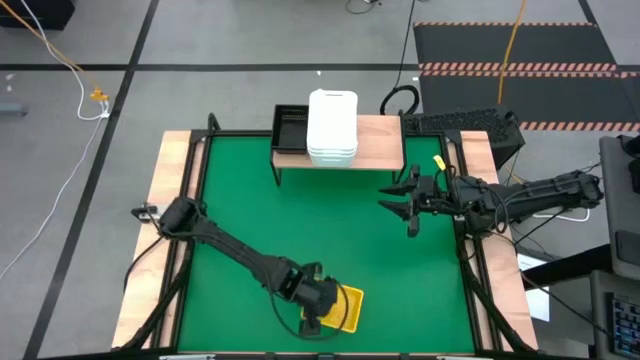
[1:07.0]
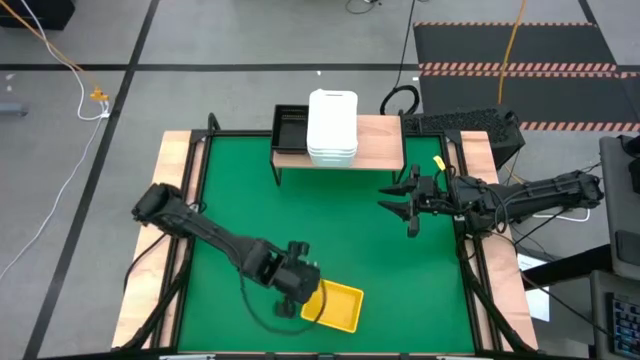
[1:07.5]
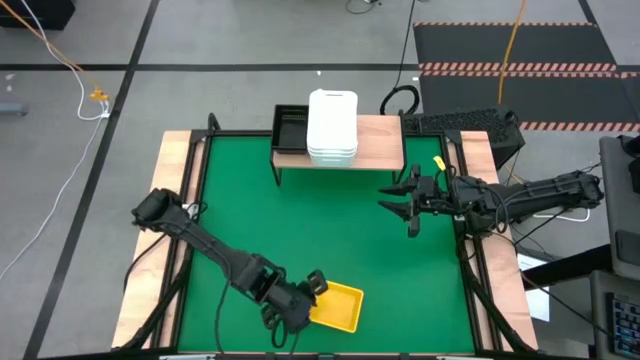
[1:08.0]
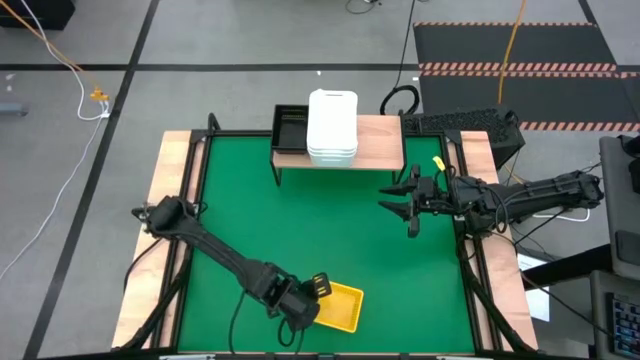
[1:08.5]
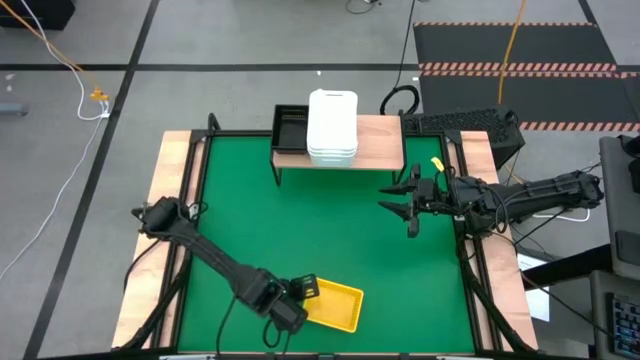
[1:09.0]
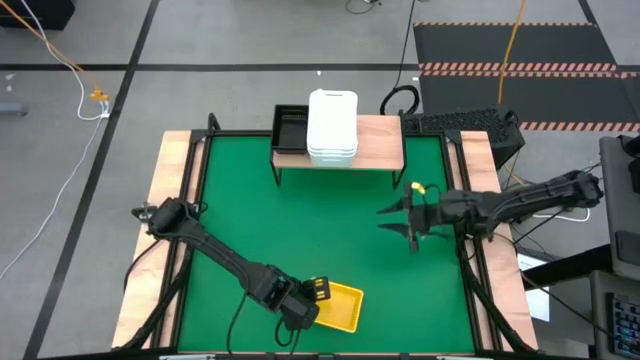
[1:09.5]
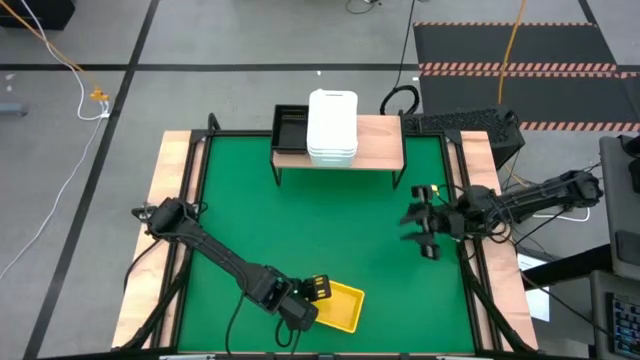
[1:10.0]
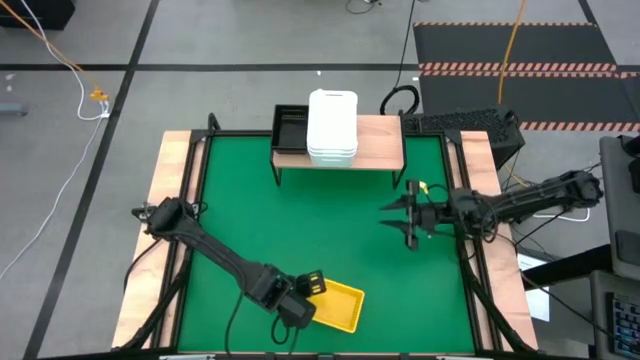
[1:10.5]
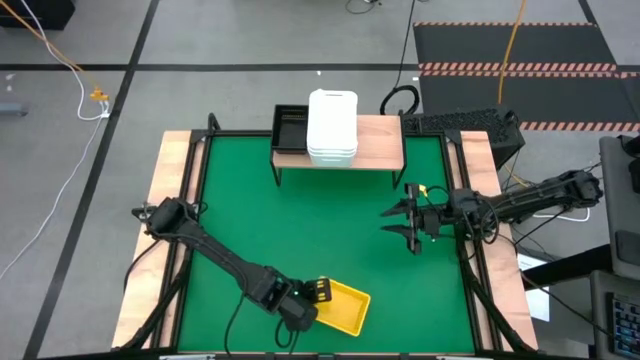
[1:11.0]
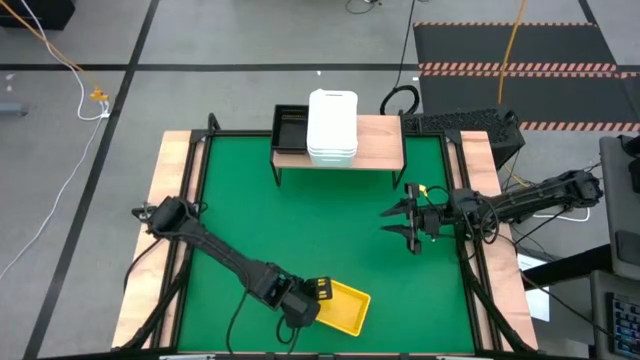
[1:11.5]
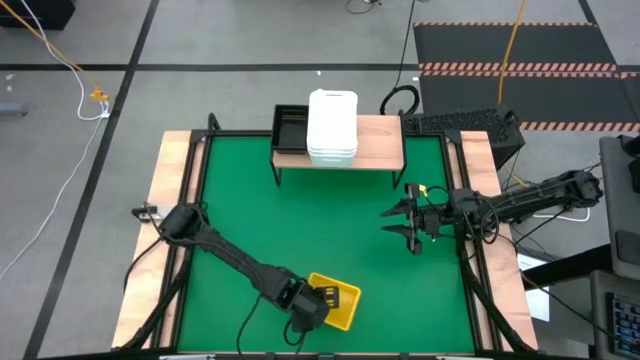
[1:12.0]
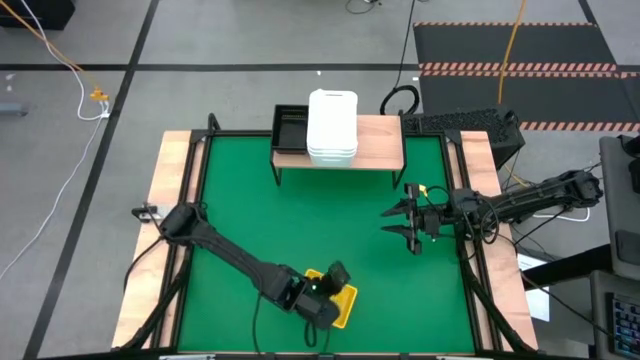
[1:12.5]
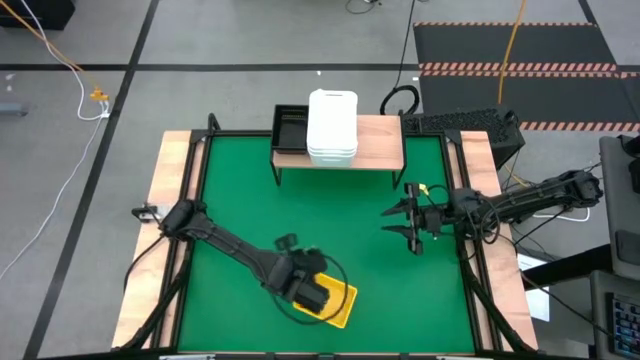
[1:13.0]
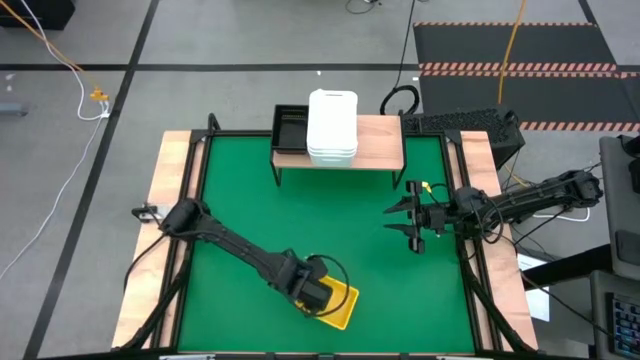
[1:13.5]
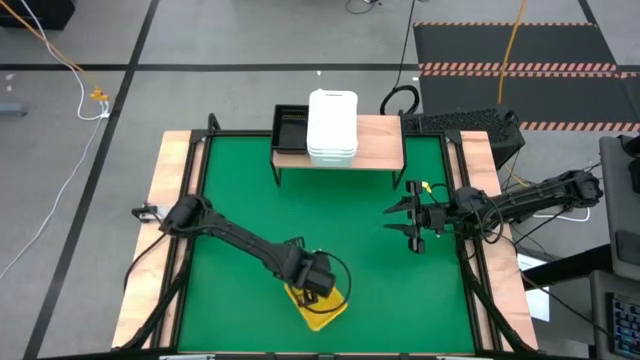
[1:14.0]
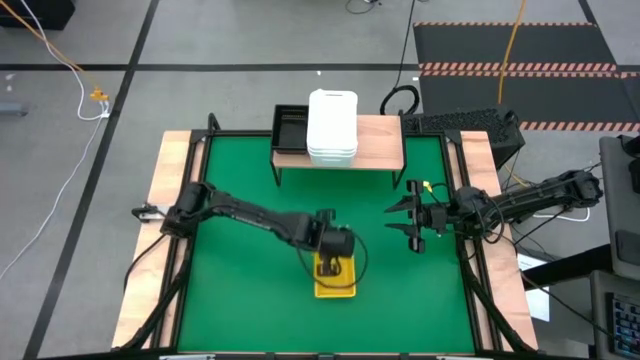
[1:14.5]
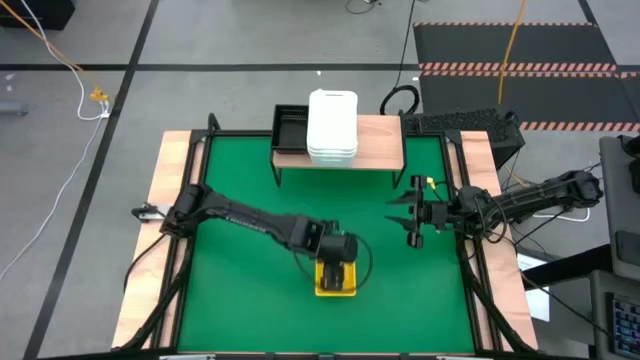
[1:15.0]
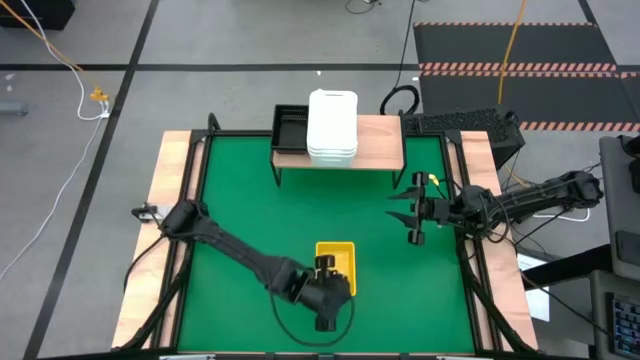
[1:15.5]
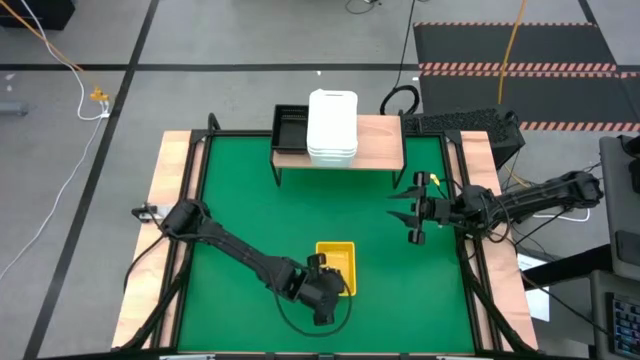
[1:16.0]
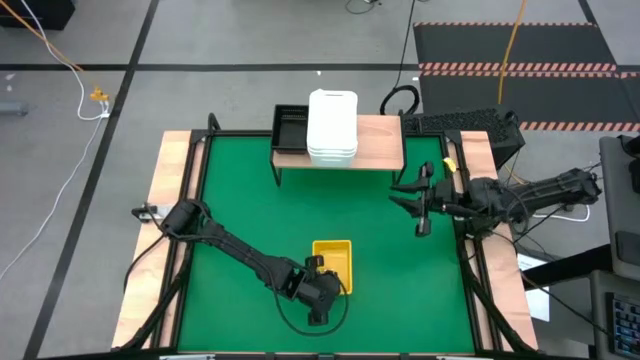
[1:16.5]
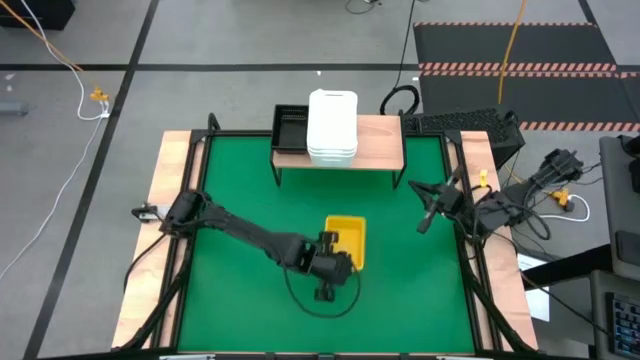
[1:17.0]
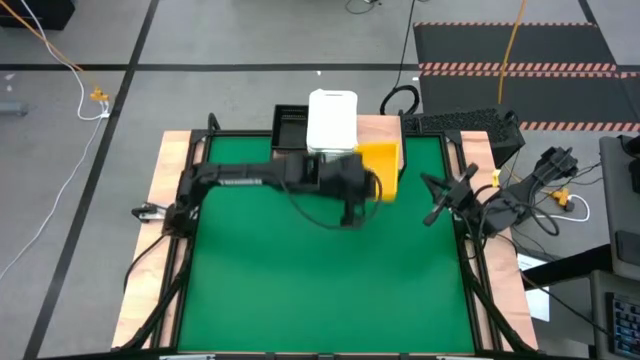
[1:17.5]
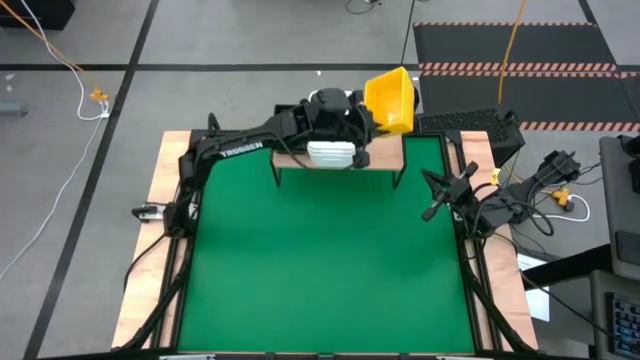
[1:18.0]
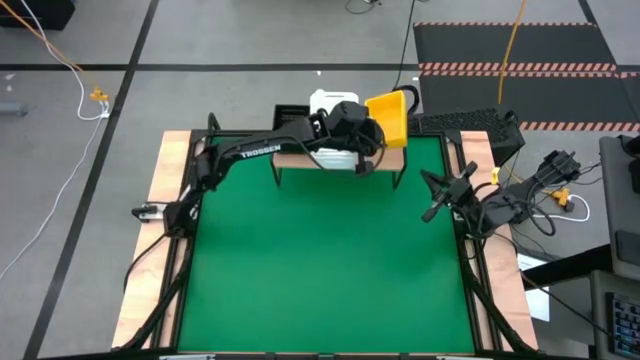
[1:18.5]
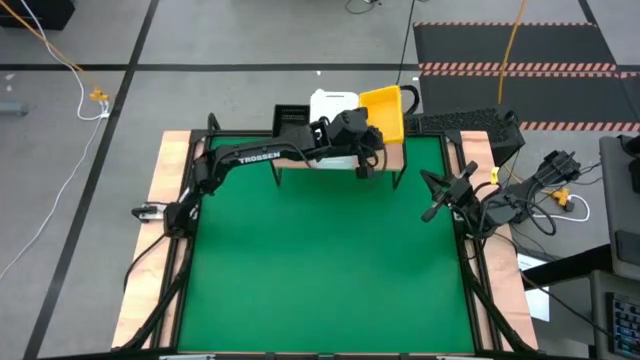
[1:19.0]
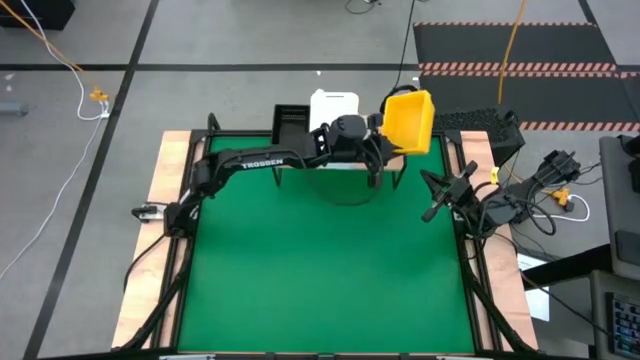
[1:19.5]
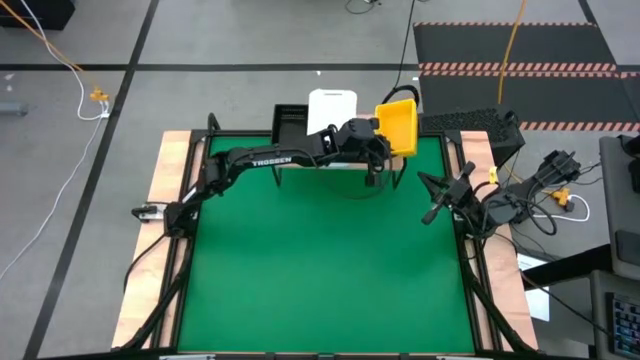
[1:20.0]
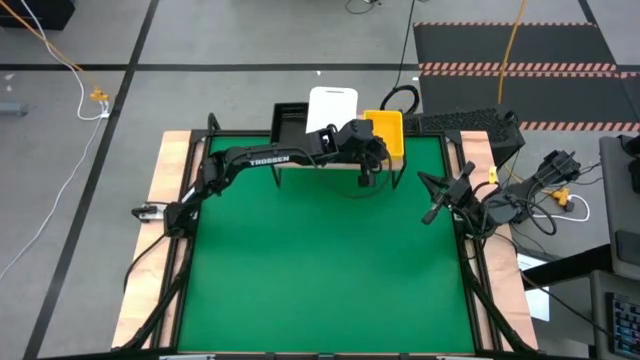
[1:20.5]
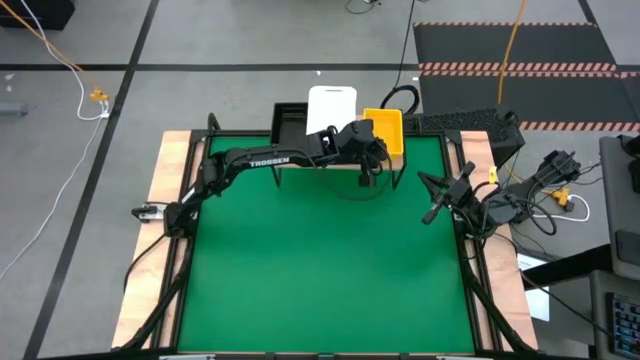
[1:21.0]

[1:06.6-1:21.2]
Task: Stack baskets on shelf by color
Put the stacked yellow bins on the shelf

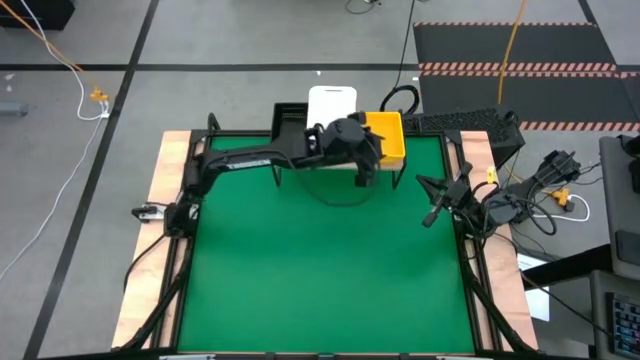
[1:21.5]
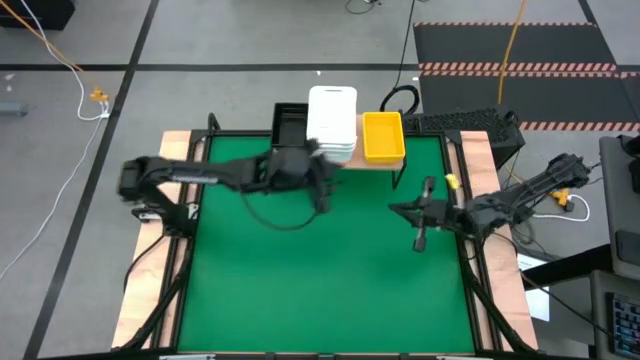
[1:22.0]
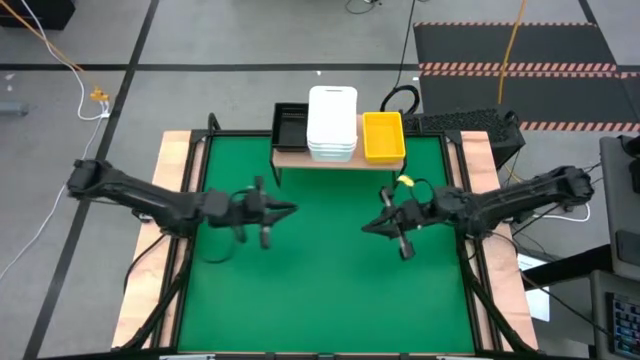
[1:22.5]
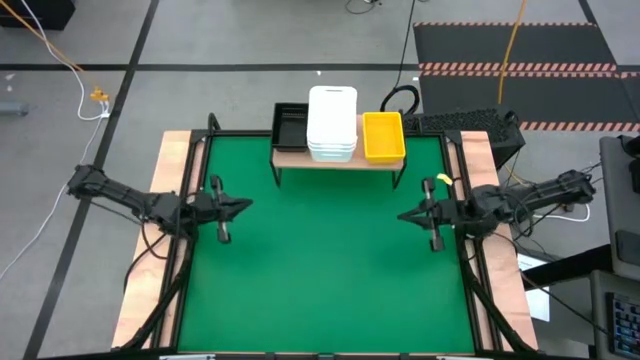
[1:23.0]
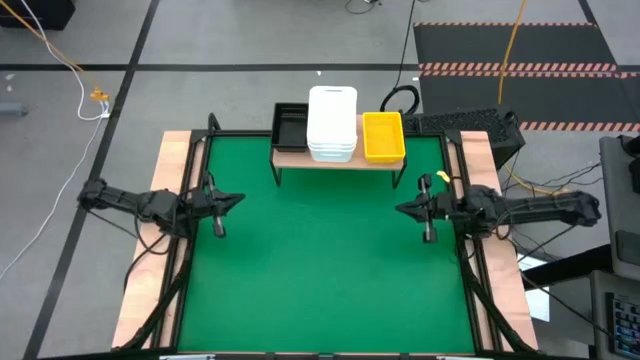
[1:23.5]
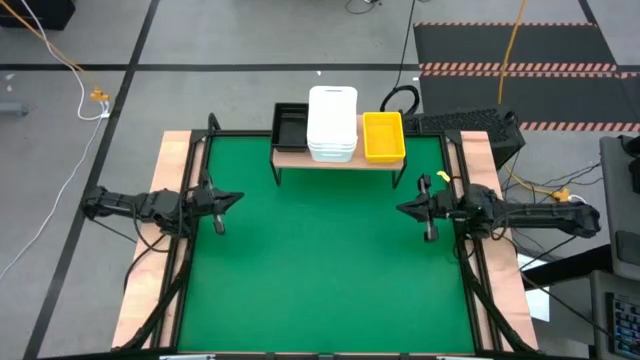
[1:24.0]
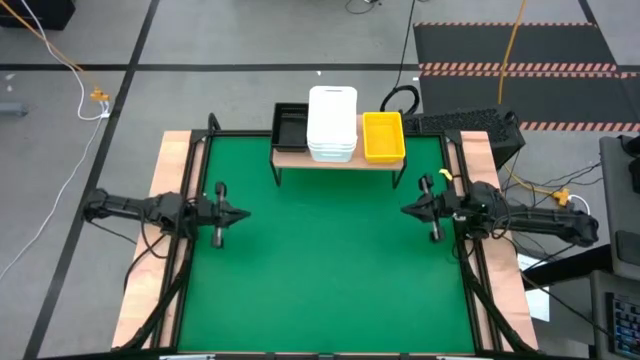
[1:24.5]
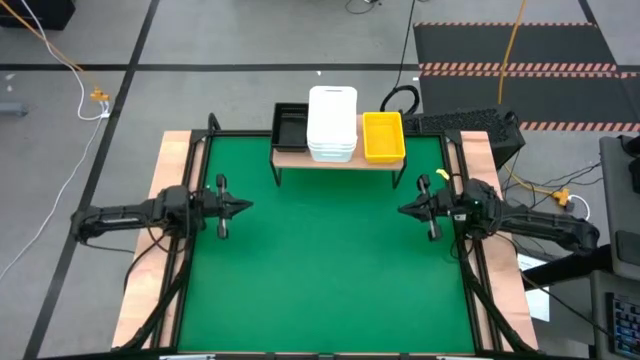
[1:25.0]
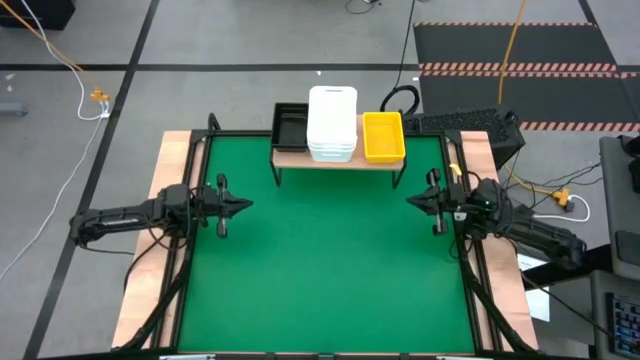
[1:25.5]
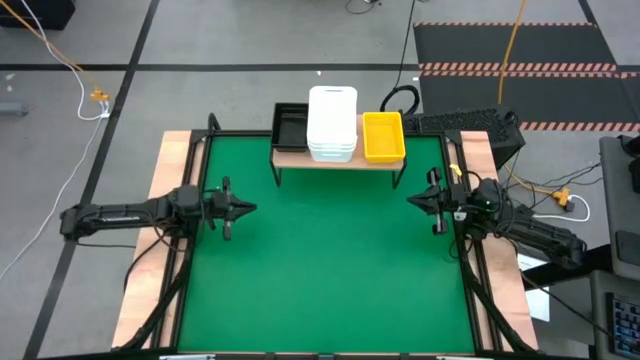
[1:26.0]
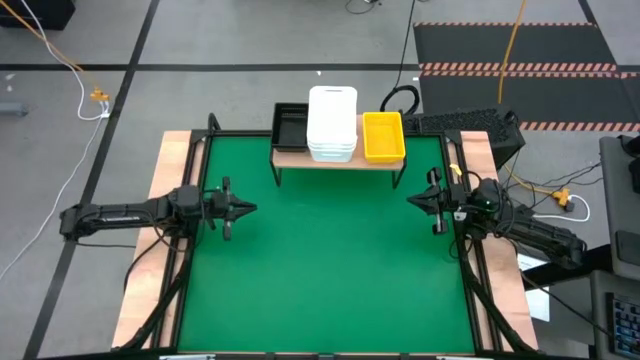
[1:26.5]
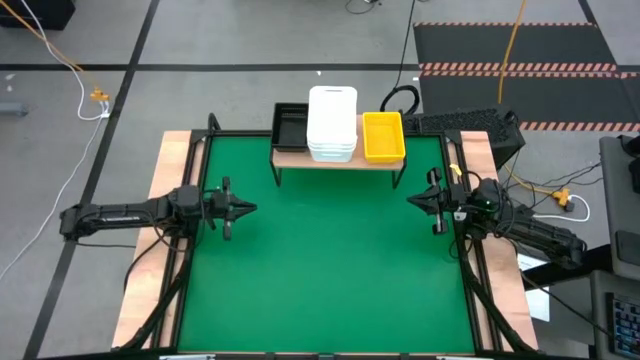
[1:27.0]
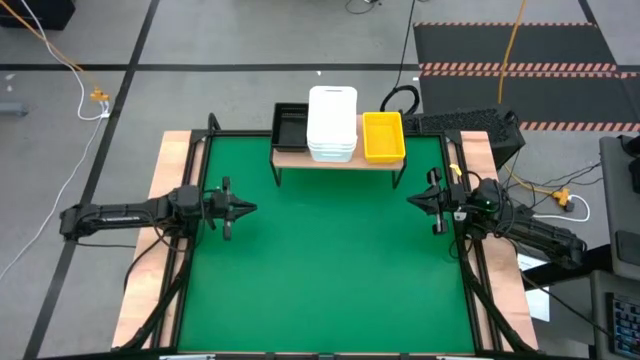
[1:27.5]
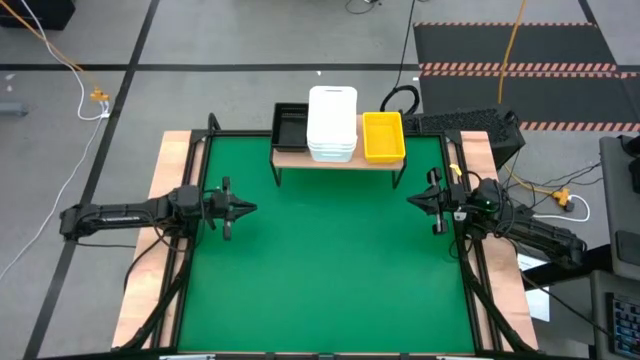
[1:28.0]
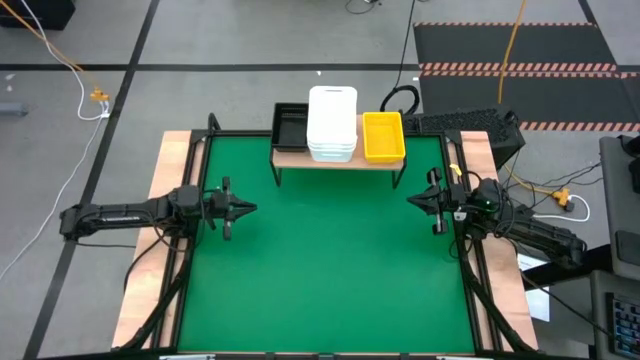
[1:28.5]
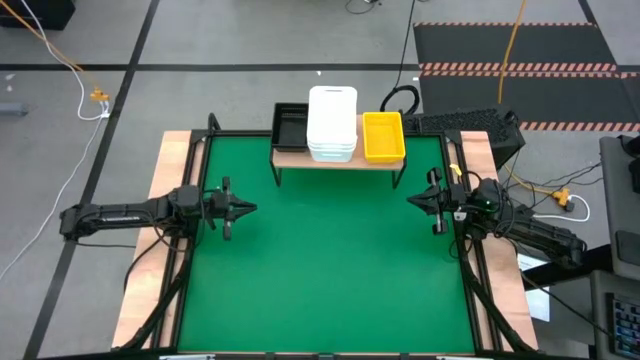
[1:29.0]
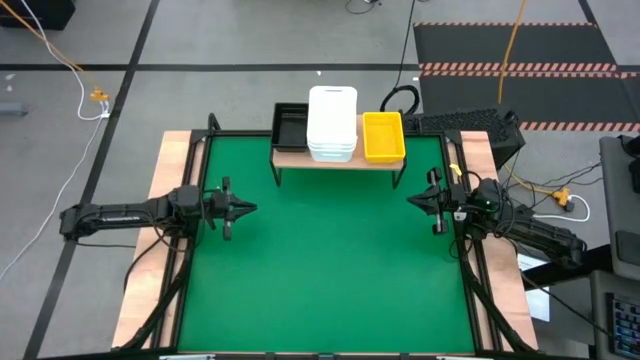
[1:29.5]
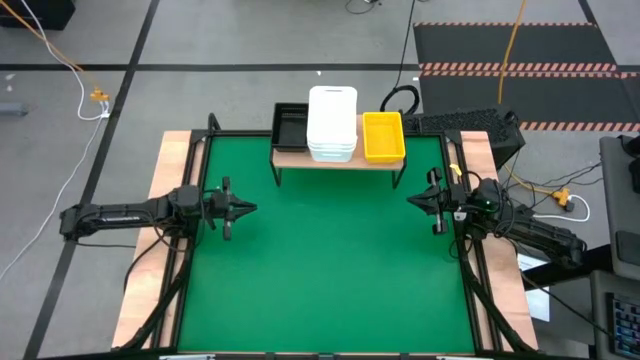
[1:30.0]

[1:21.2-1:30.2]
Return to Home Position
